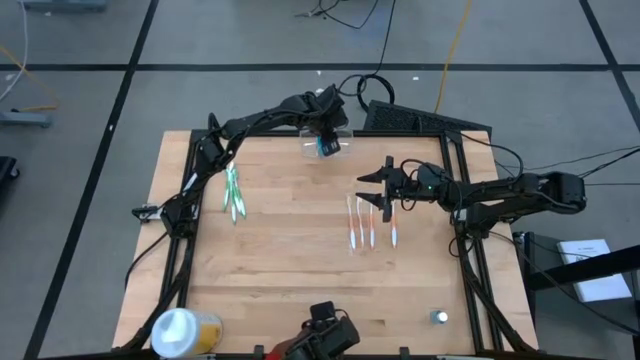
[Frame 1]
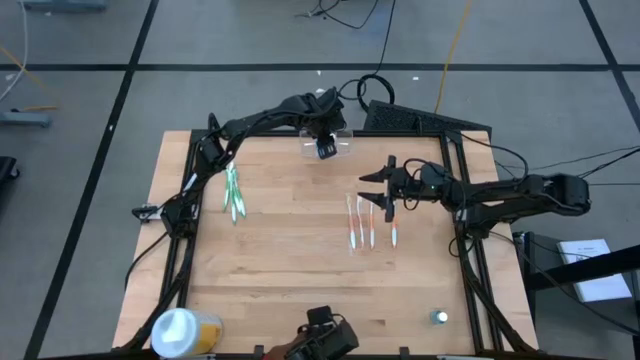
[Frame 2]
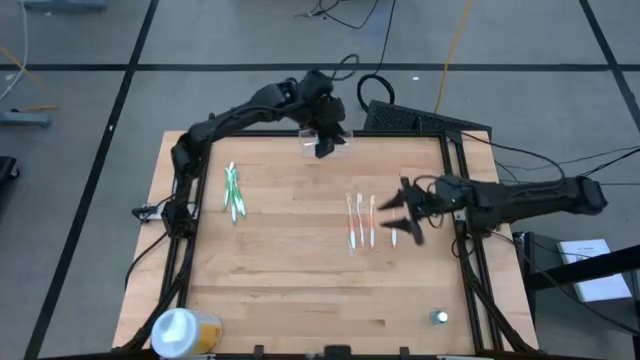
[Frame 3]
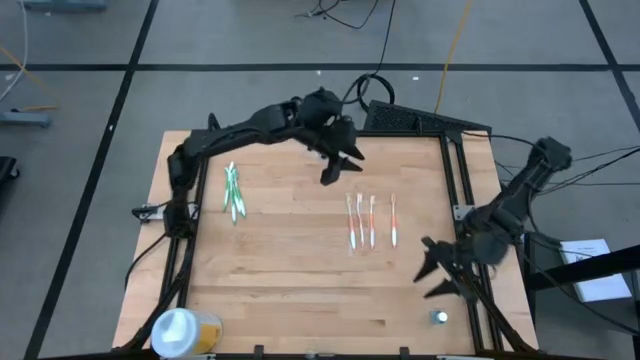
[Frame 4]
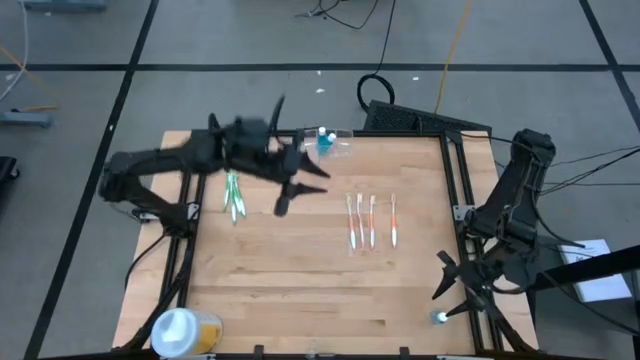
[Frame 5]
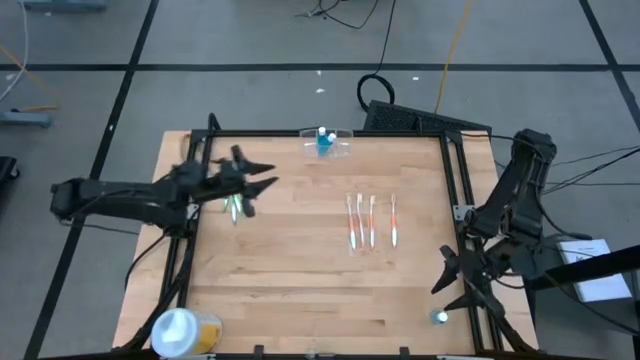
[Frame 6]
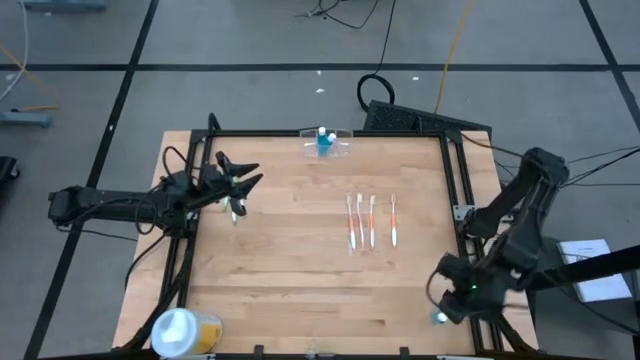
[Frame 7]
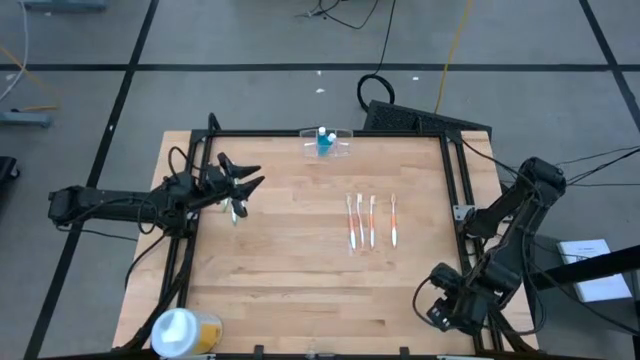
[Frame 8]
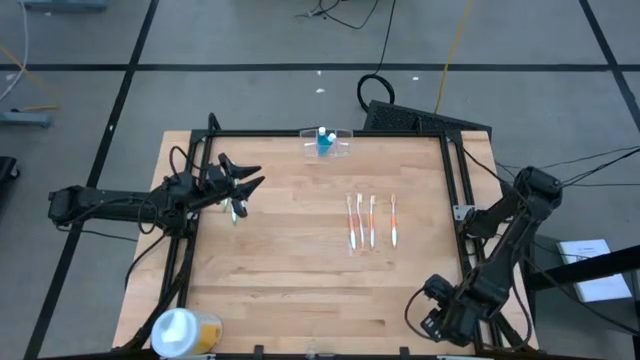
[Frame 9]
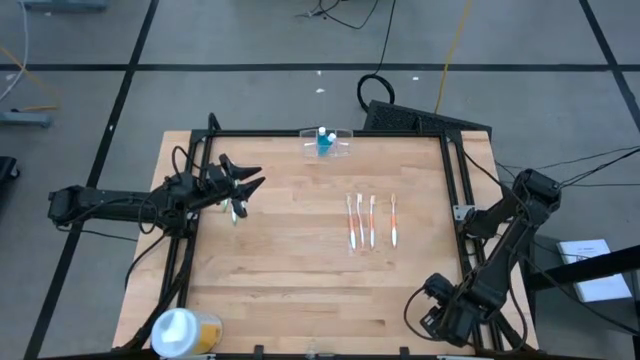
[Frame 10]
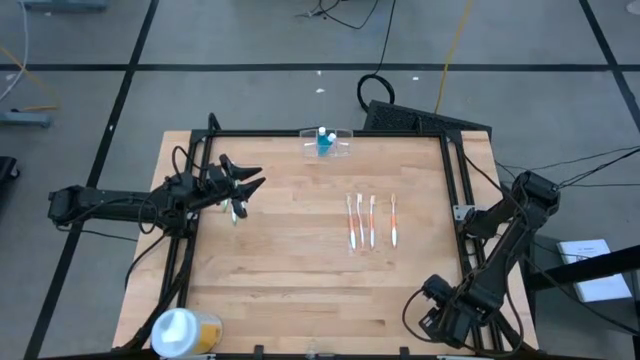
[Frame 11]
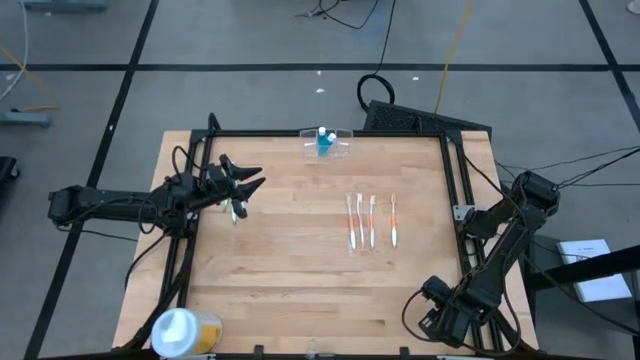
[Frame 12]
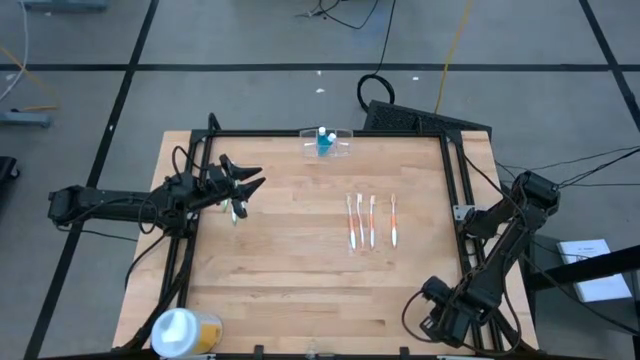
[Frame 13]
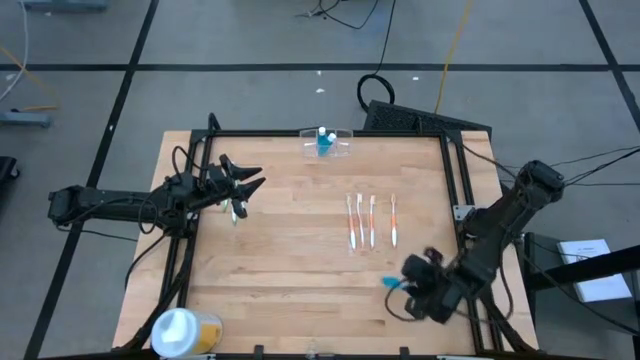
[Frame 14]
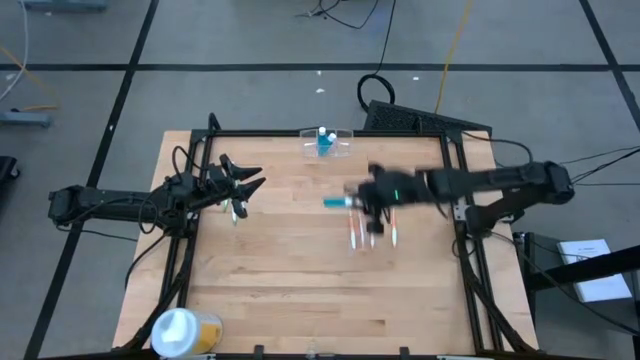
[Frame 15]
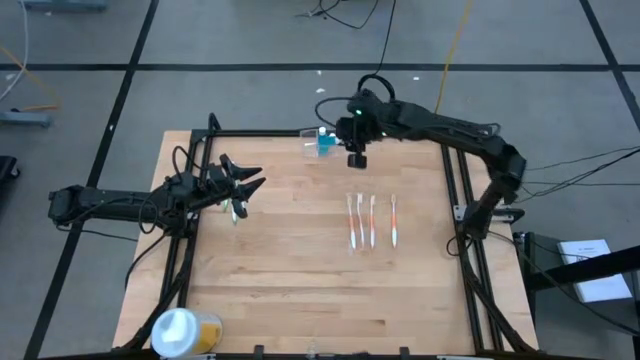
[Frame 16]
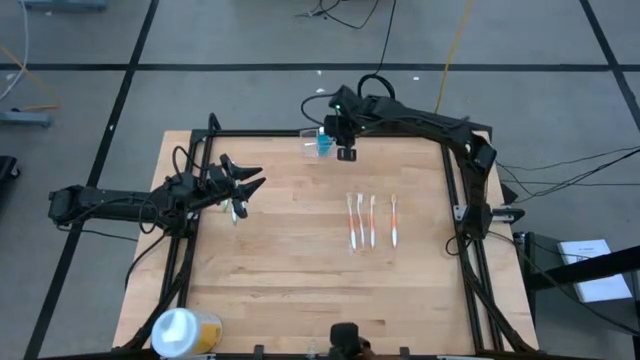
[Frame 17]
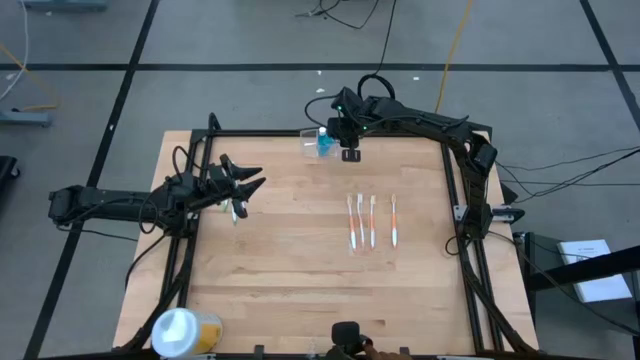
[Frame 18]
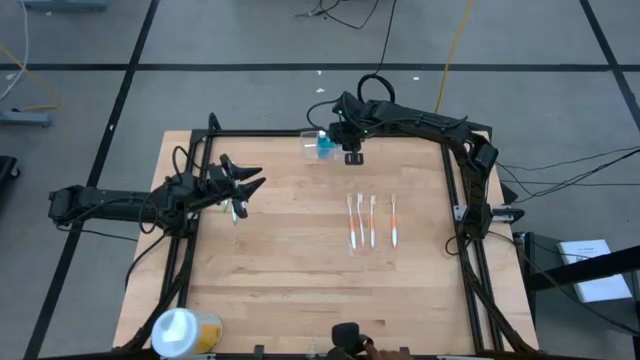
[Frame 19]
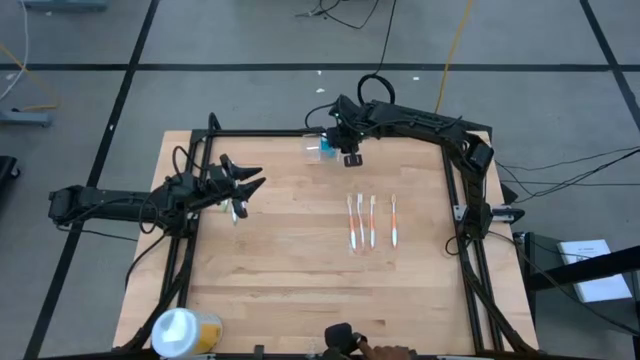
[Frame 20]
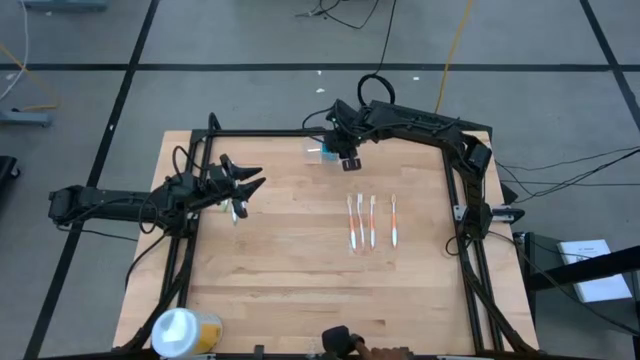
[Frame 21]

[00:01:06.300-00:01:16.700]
Task: Pick & Place toothbrushing station
Put the blue mouthwash into the transparent organizer

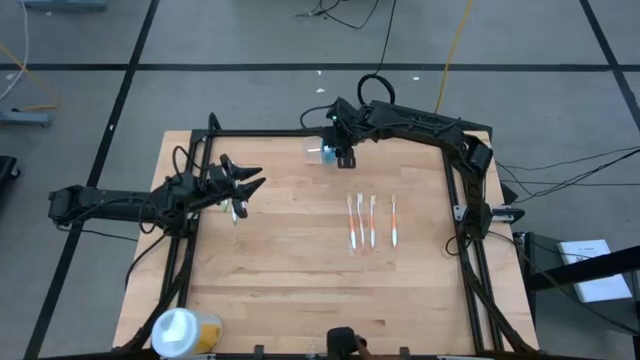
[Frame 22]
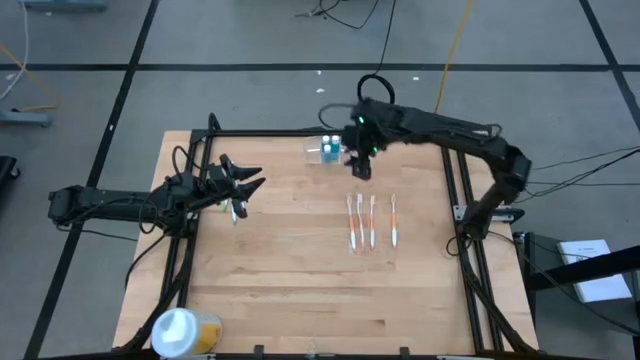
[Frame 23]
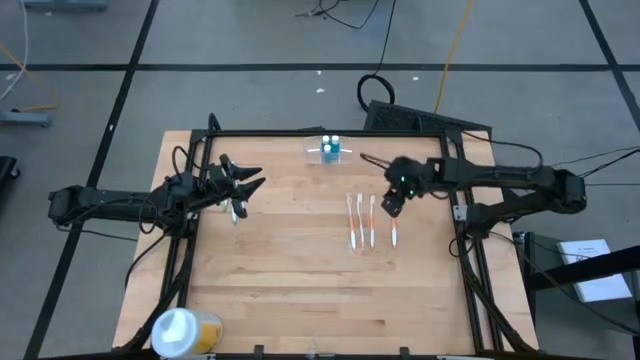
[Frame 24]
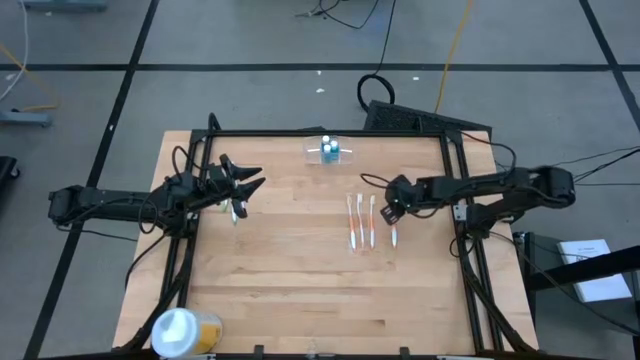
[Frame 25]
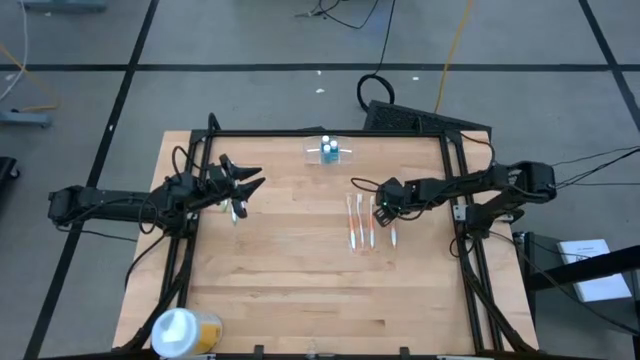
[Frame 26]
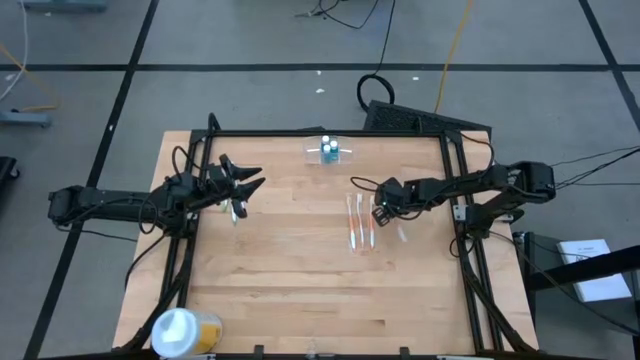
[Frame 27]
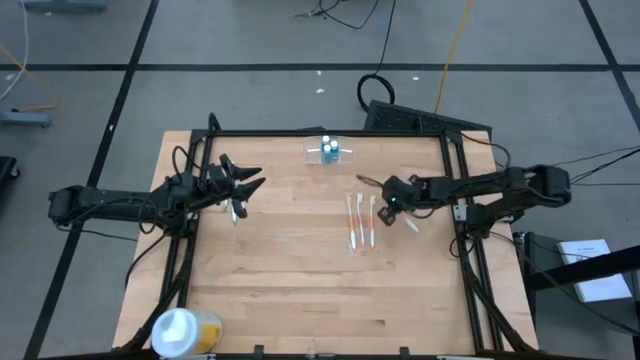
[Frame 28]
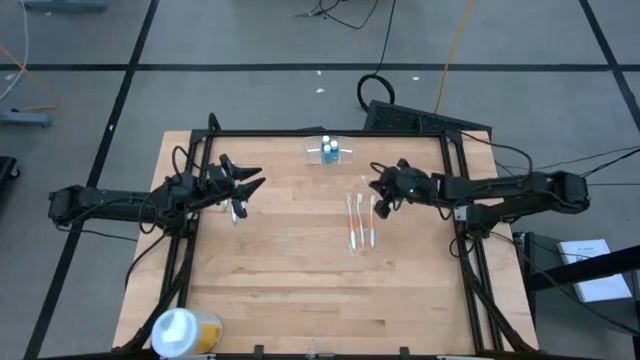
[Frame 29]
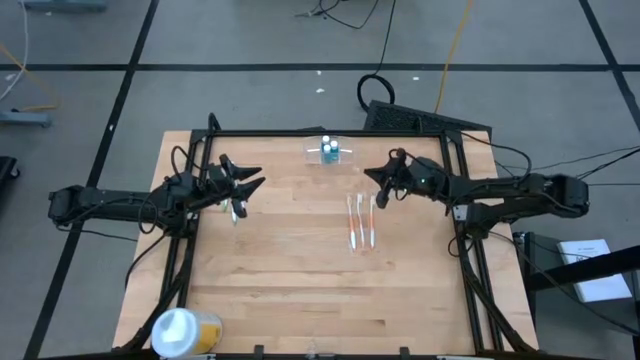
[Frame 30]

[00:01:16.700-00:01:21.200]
Put the orange toothbrush into the transparent organizer

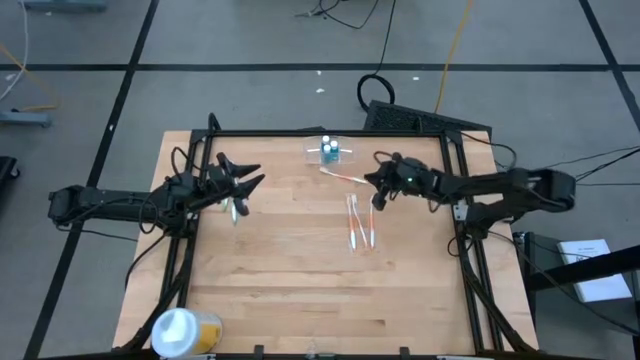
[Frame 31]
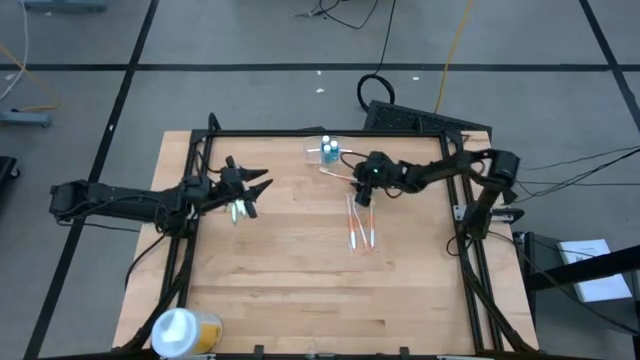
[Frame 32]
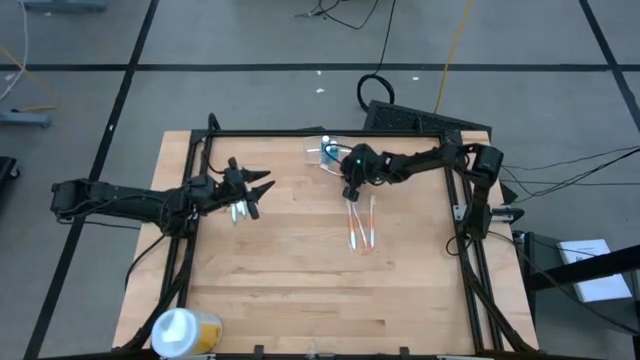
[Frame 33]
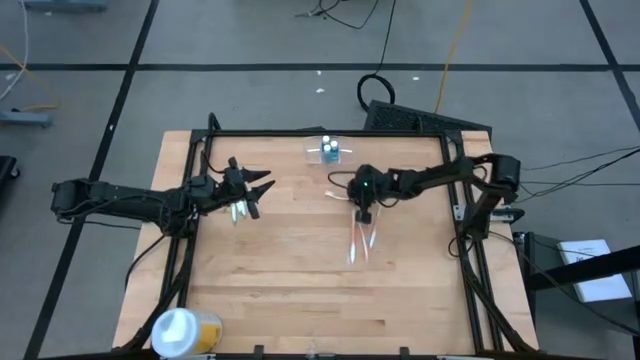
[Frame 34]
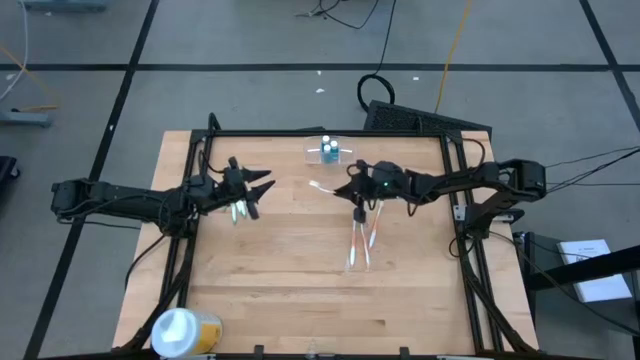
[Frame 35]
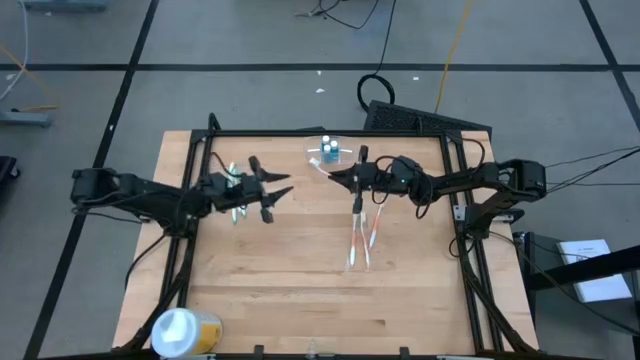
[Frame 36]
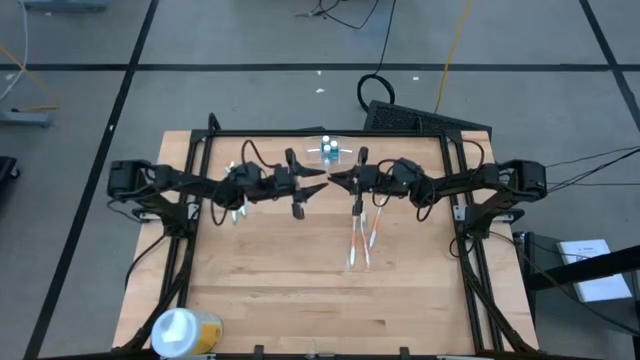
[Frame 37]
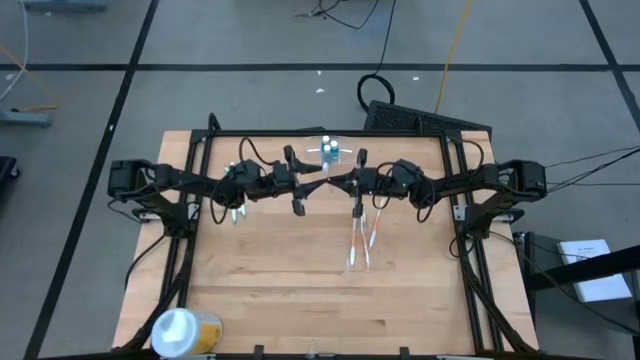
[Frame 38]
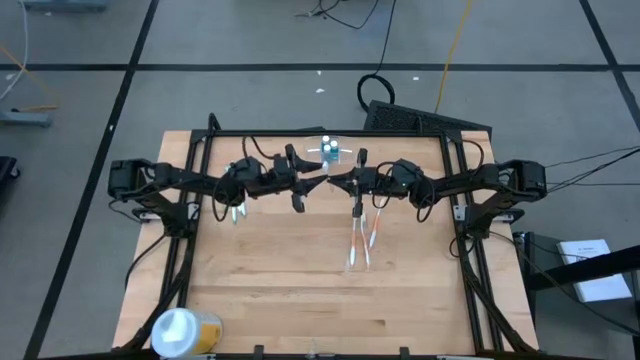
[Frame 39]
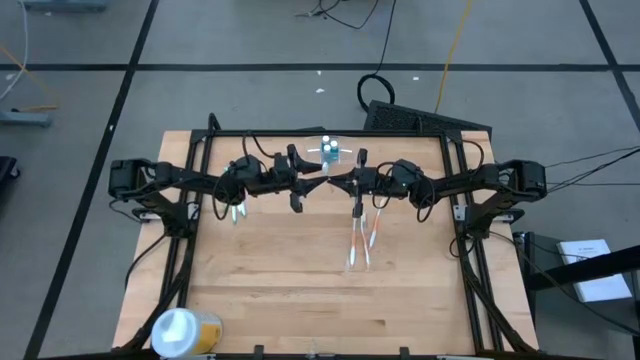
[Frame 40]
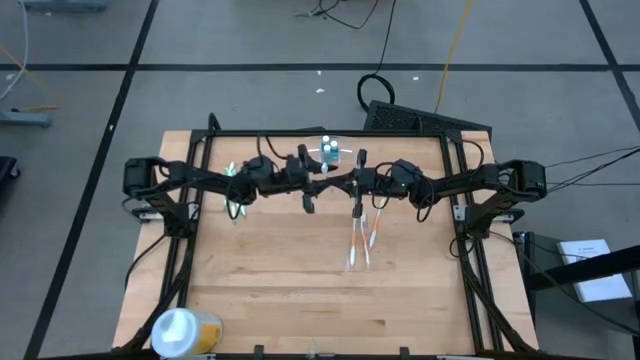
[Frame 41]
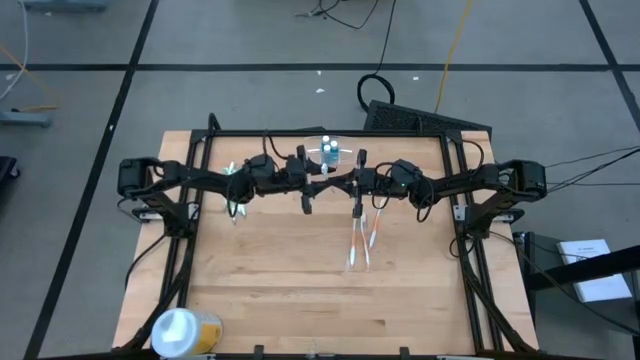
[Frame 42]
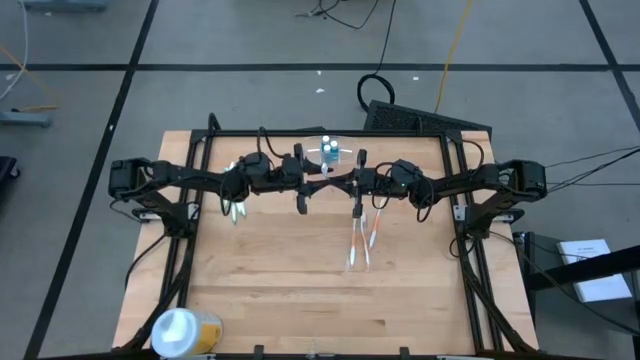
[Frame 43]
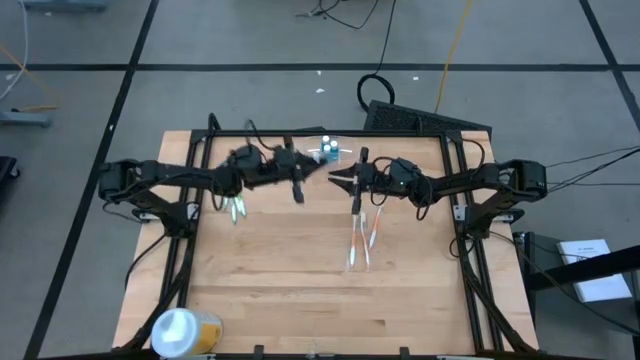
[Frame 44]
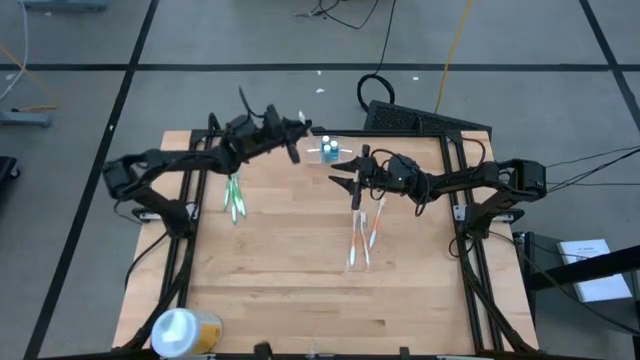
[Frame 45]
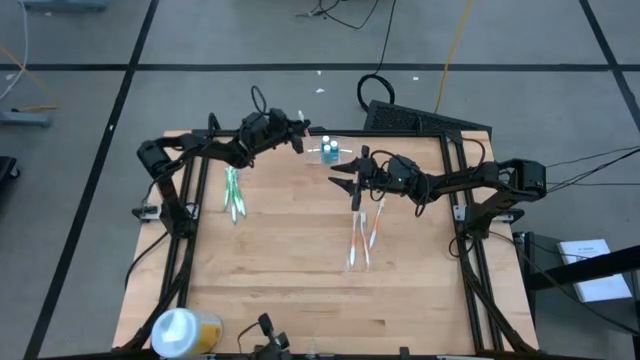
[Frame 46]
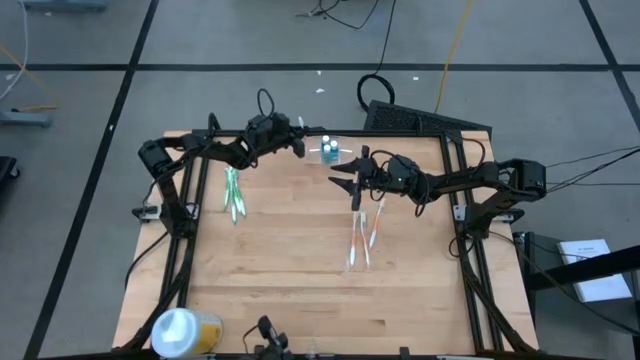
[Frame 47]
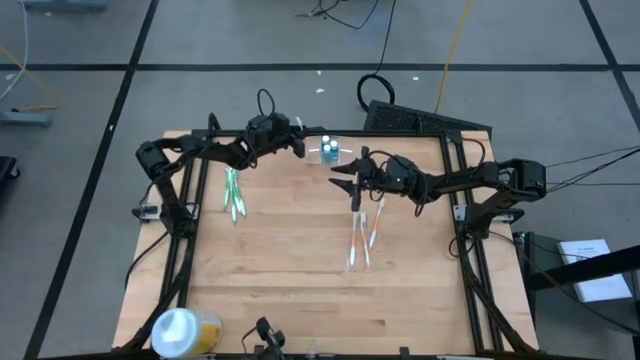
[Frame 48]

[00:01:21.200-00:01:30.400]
Put the orange toothbrush into the transparent organizer
